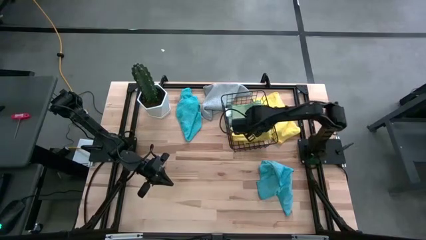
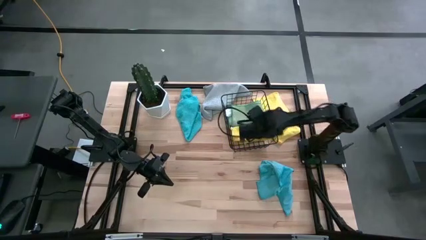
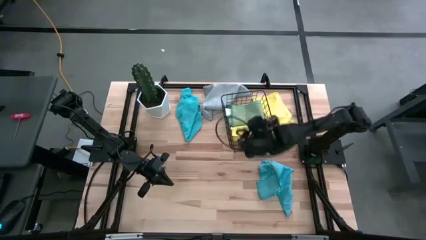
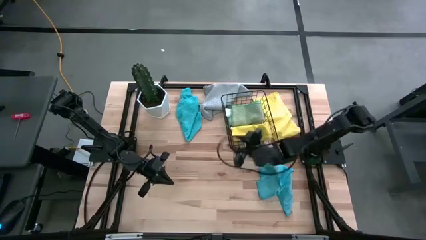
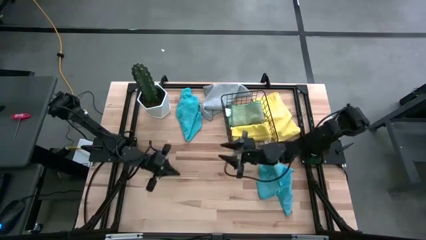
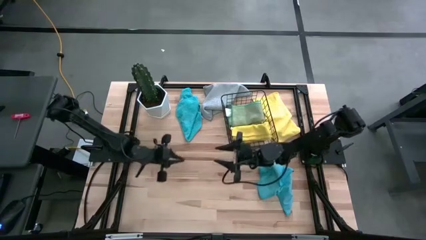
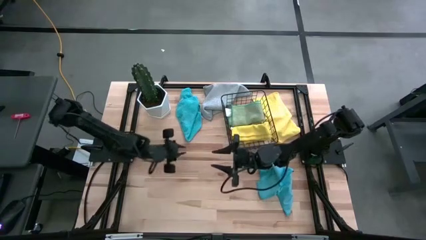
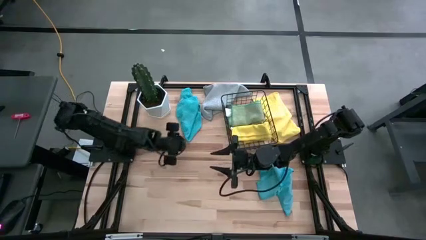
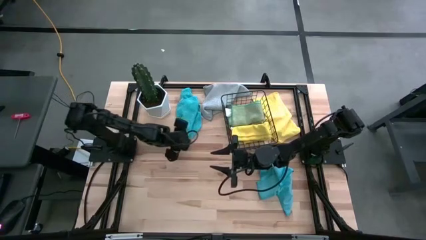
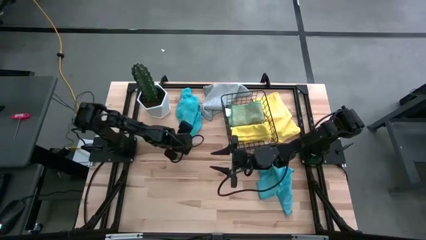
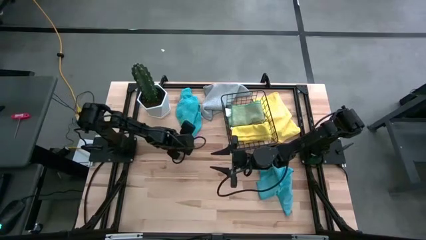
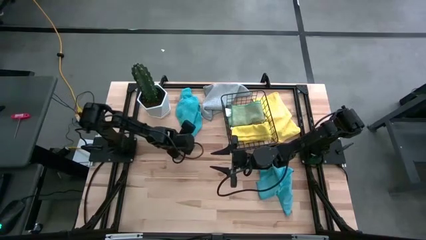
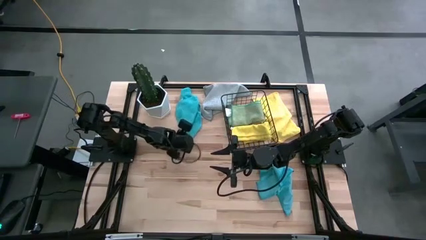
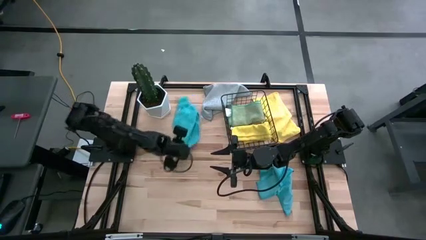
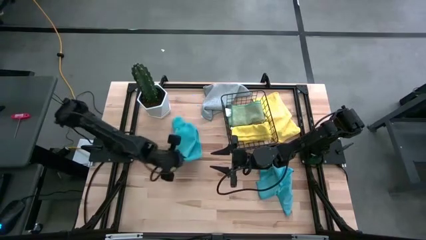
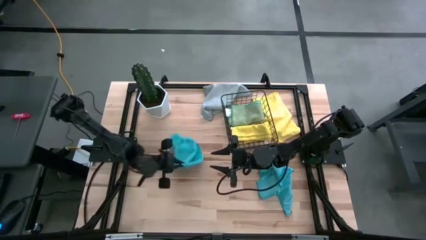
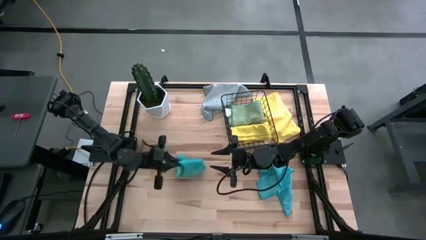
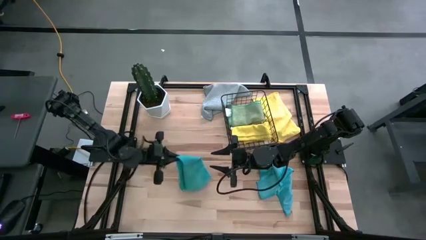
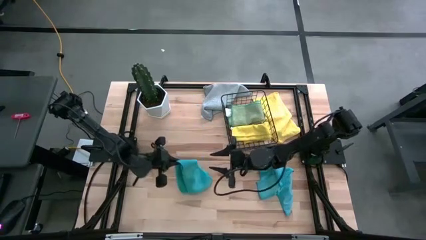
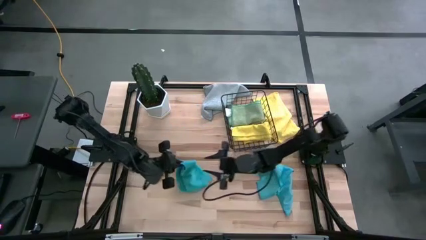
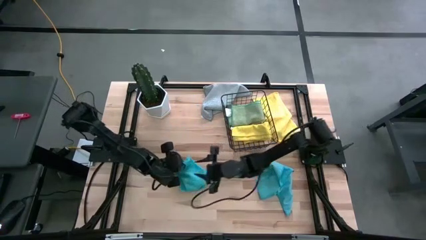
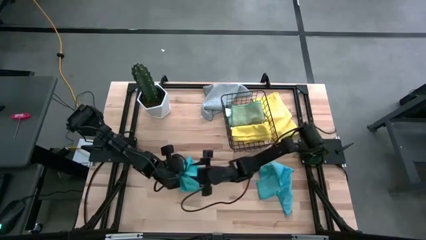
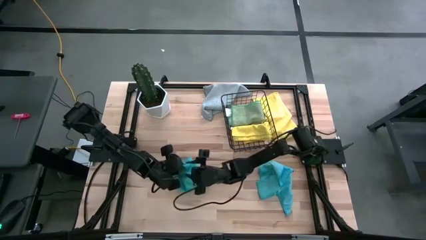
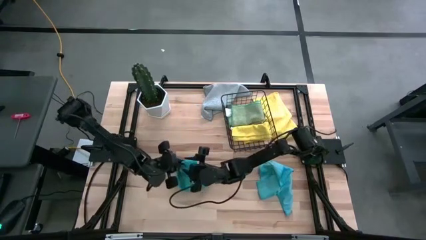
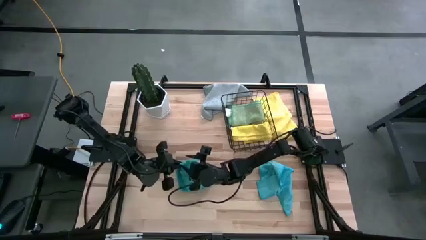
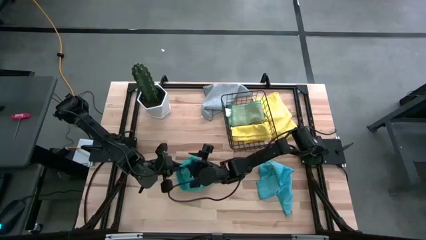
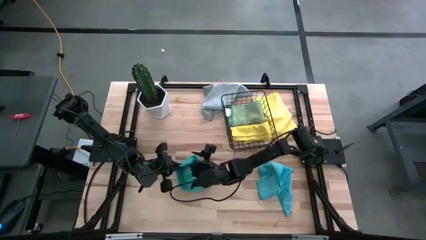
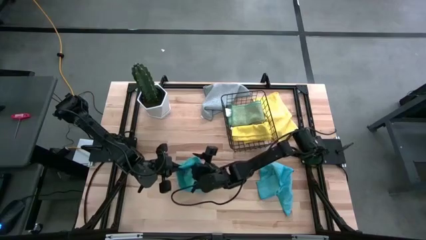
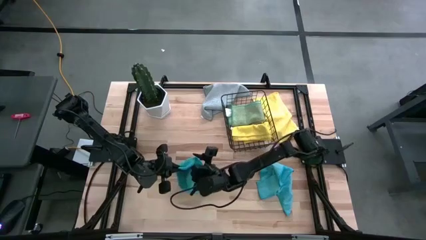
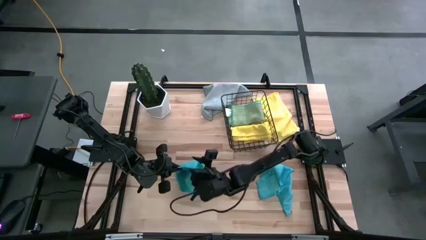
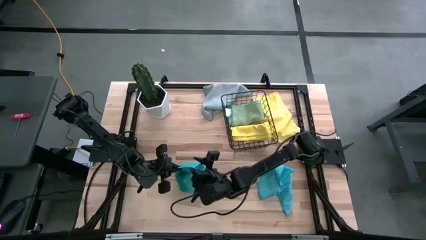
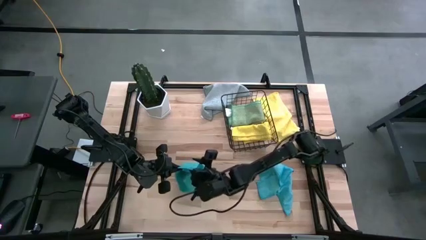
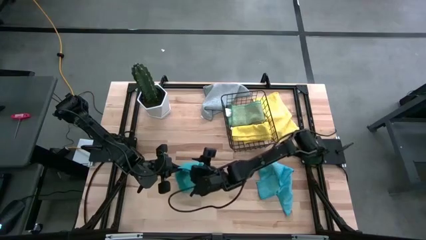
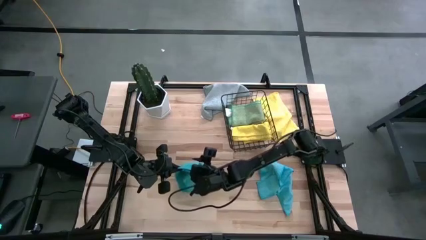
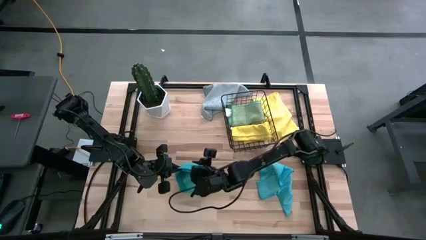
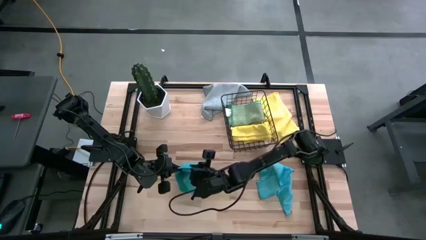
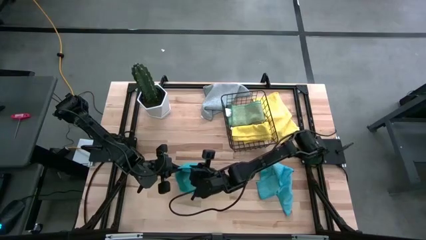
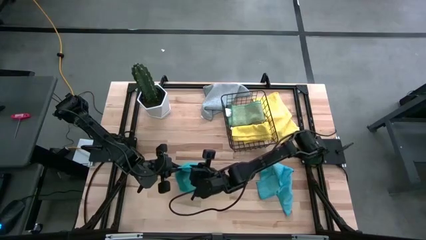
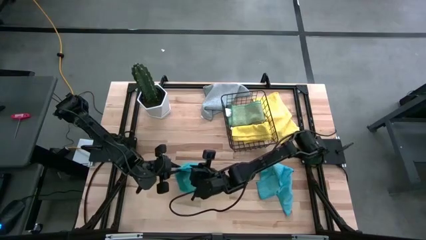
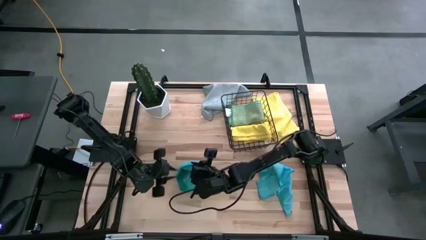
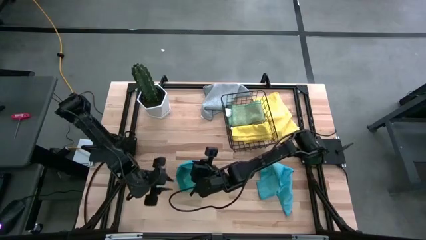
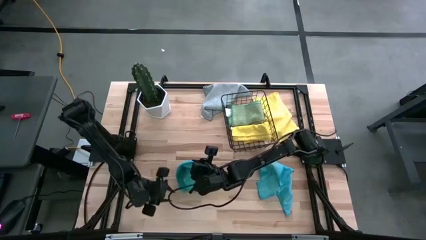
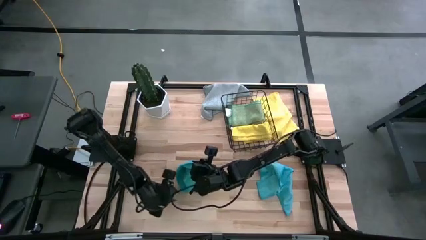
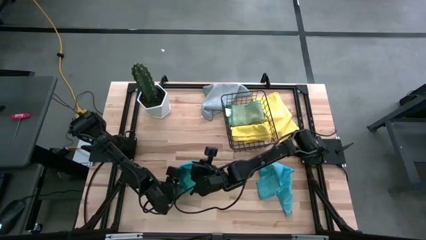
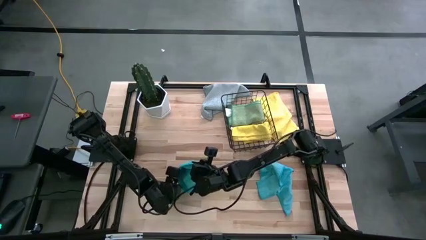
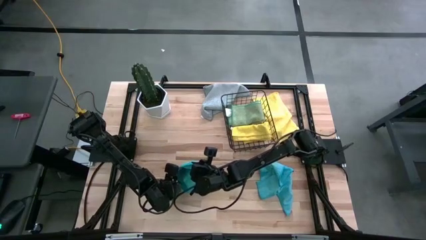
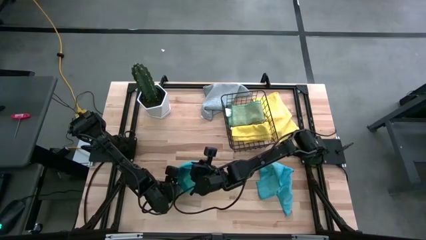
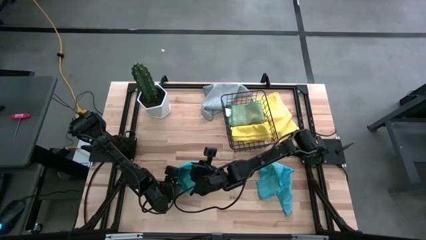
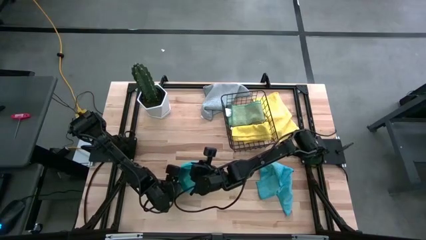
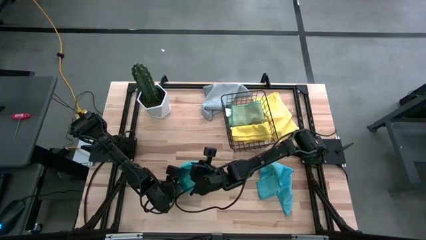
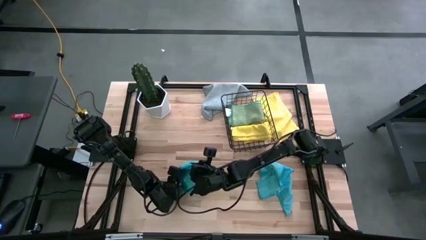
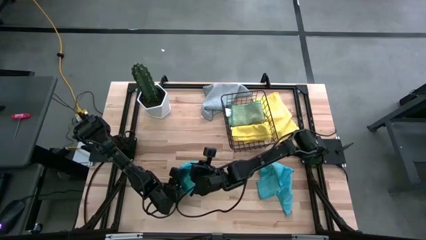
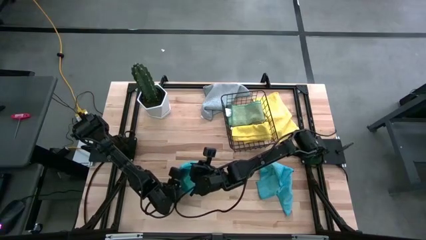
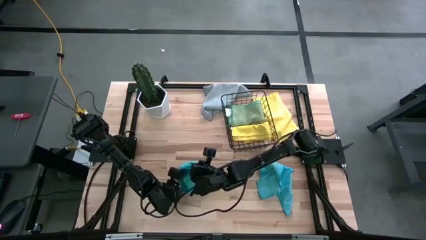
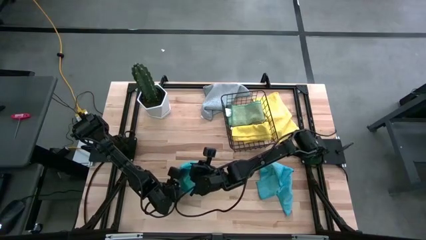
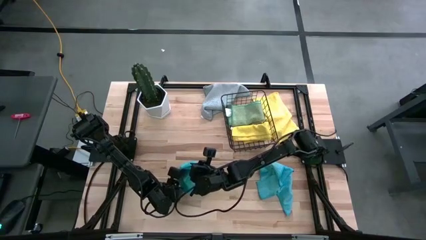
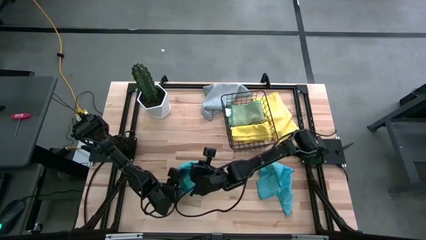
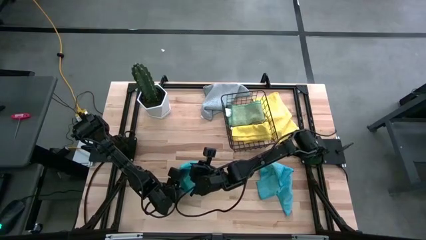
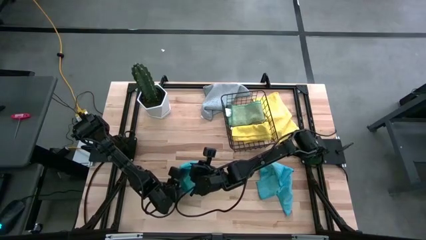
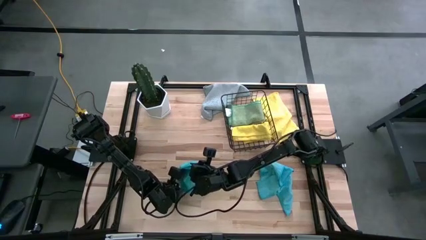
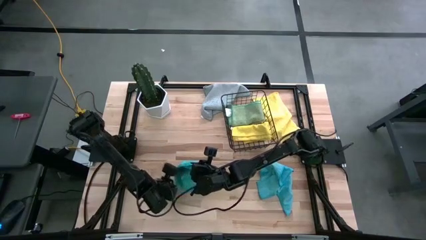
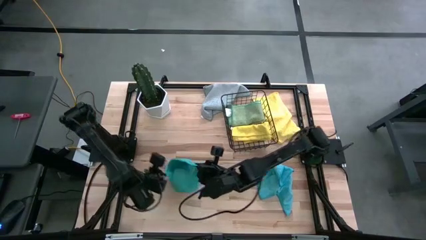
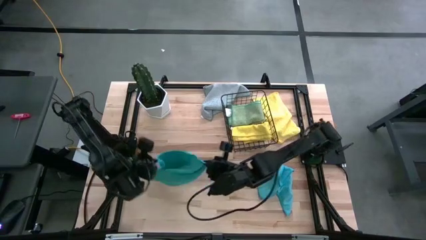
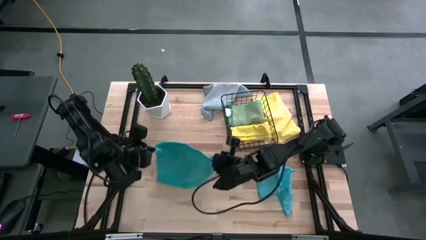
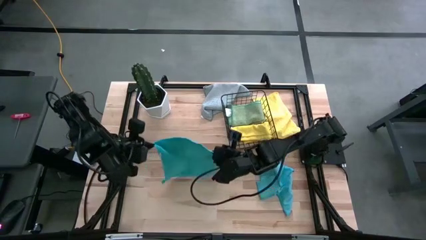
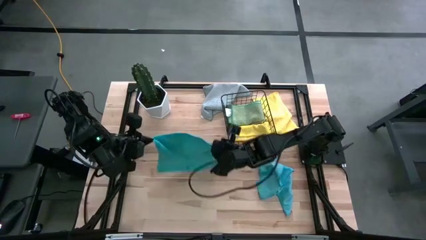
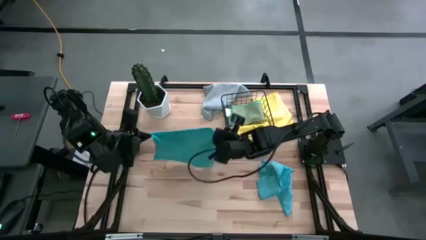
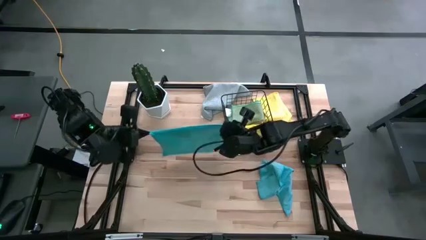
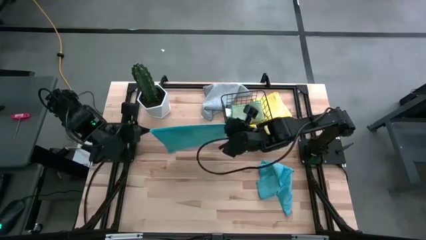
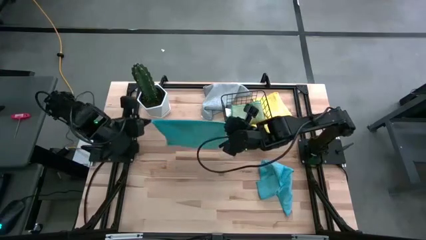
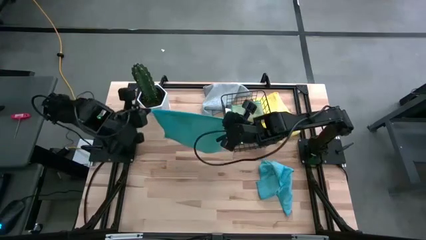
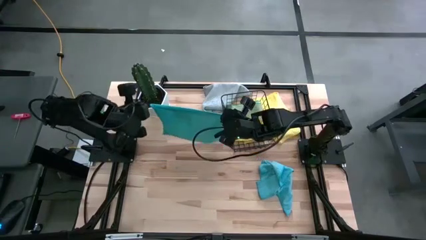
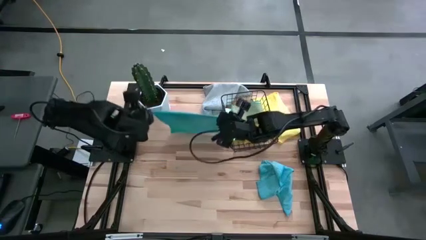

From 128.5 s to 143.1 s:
Task: Fold microfiber towels
Fold the top blue microfiber towel

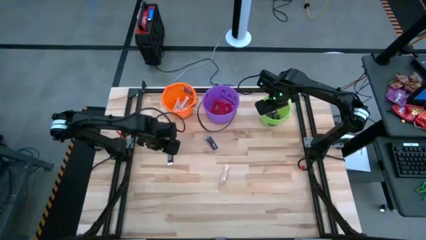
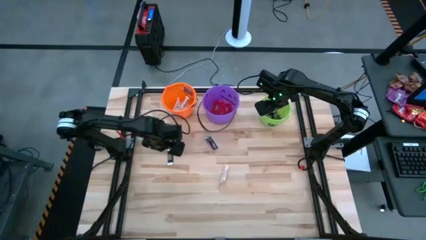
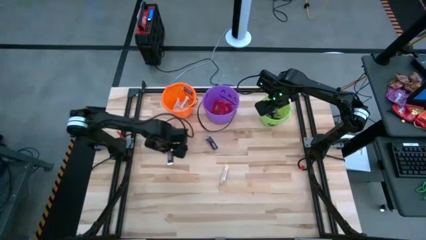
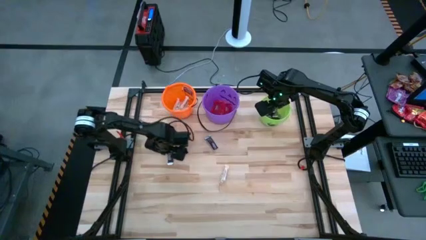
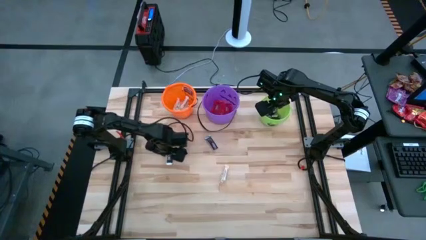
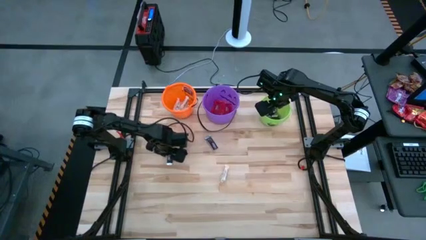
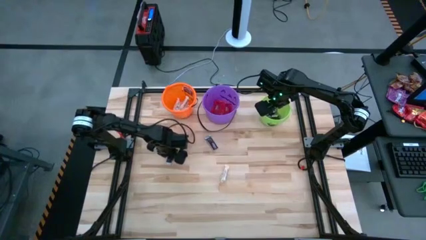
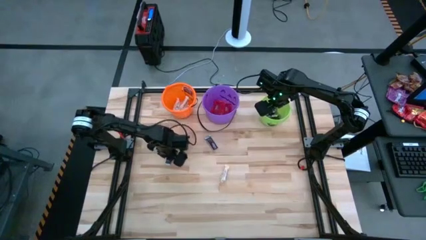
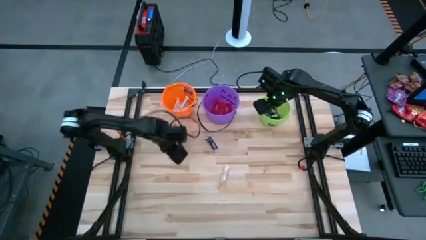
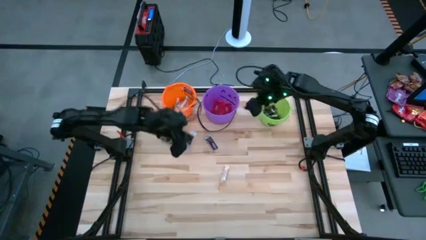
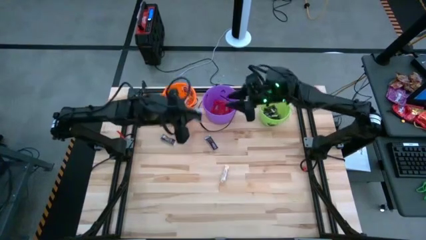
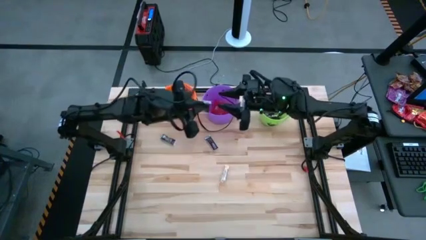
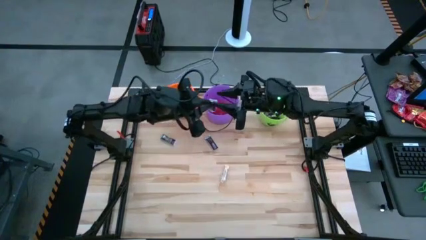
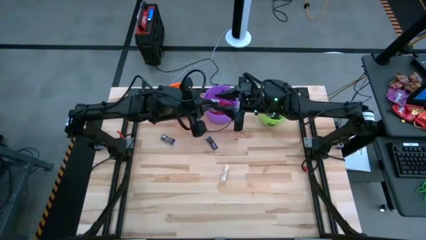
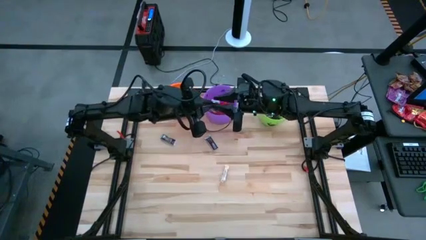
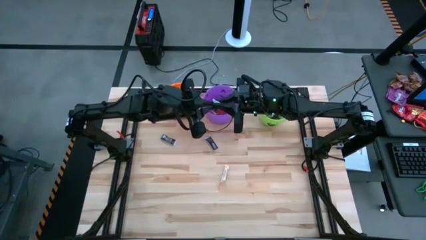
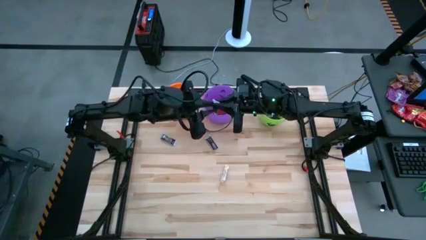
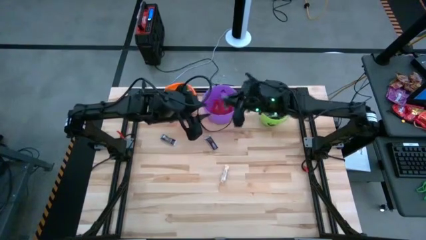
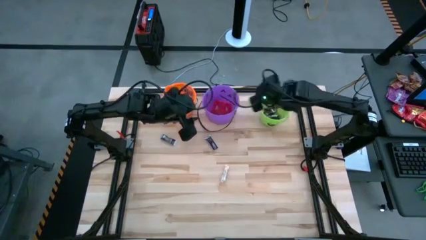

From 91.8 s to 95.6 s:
Task: Sort candy by brand, put in halloween buckets
Put the brown chocolate bar into the green bucket
